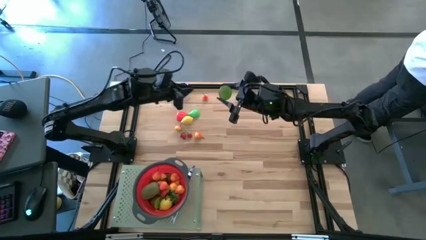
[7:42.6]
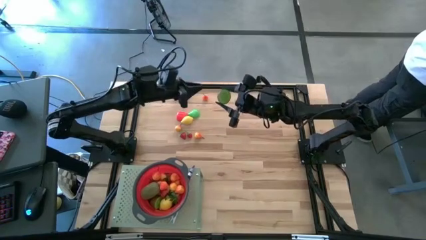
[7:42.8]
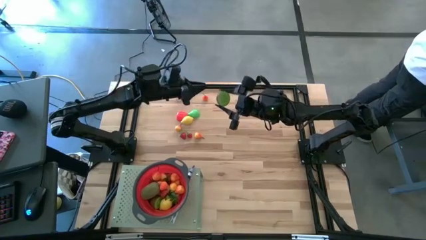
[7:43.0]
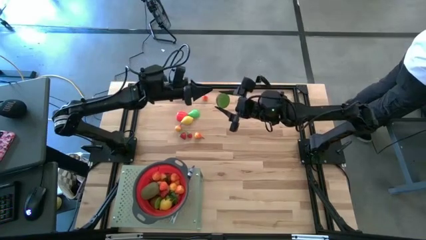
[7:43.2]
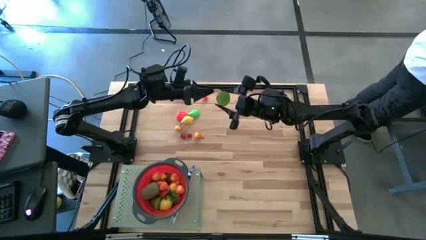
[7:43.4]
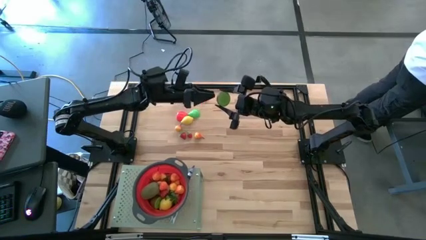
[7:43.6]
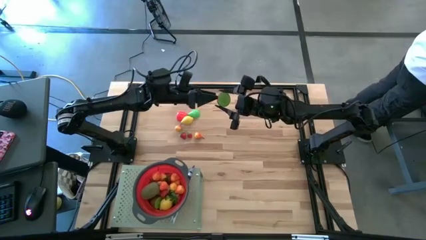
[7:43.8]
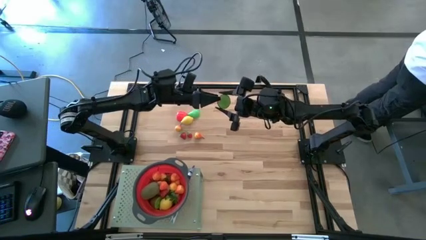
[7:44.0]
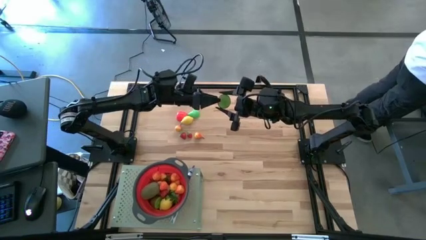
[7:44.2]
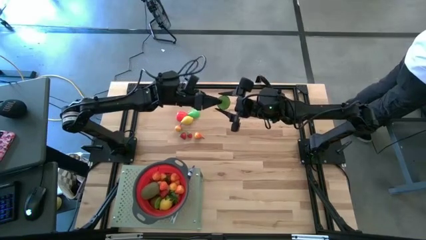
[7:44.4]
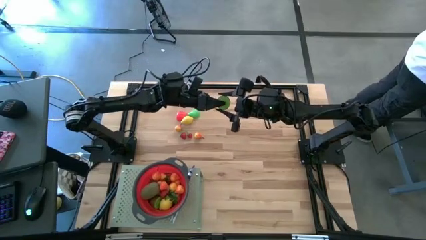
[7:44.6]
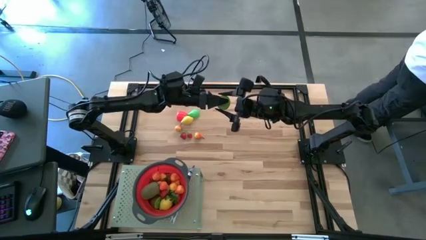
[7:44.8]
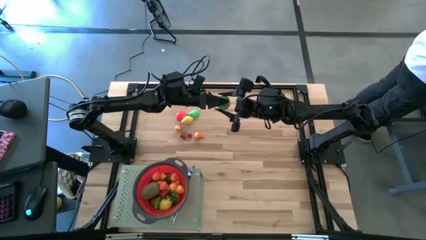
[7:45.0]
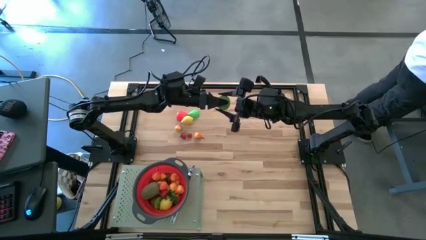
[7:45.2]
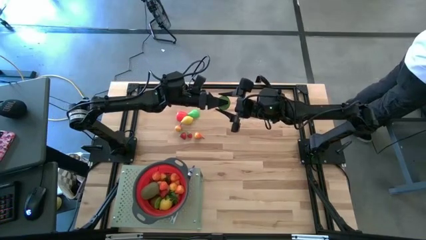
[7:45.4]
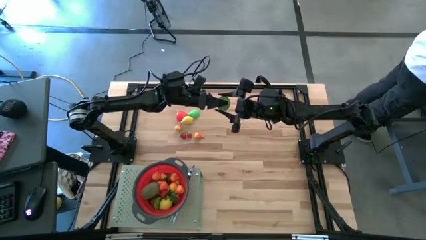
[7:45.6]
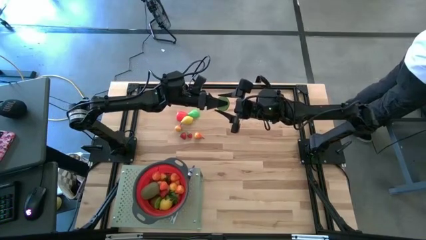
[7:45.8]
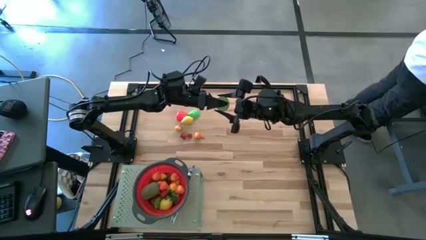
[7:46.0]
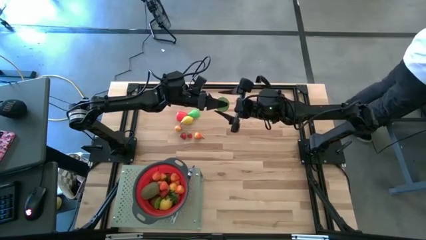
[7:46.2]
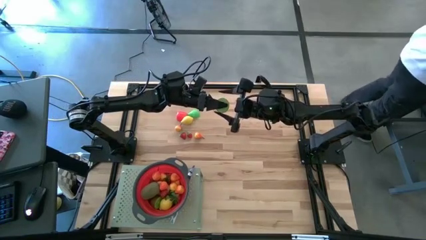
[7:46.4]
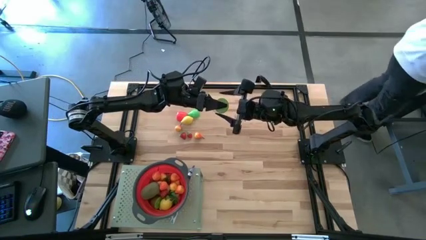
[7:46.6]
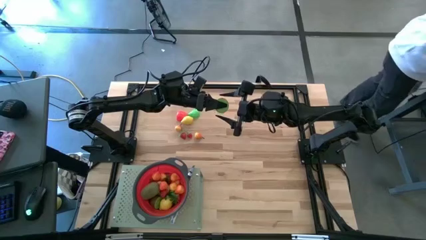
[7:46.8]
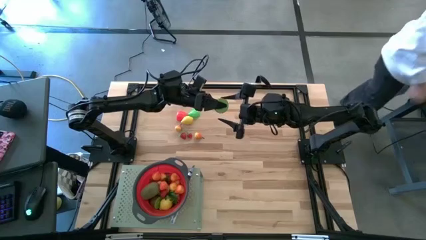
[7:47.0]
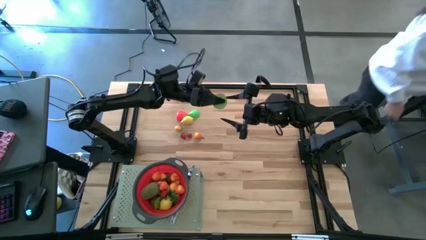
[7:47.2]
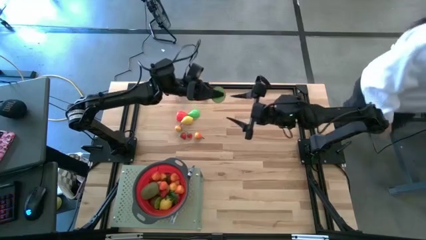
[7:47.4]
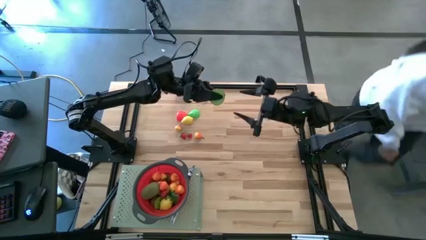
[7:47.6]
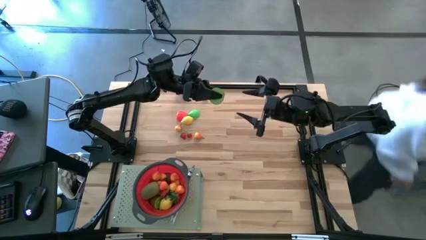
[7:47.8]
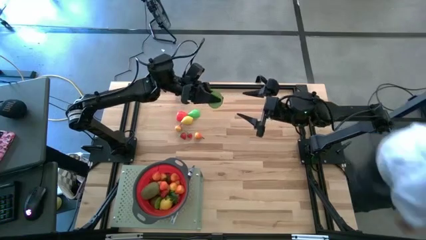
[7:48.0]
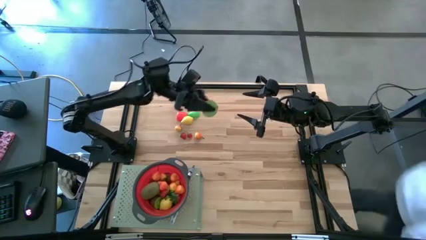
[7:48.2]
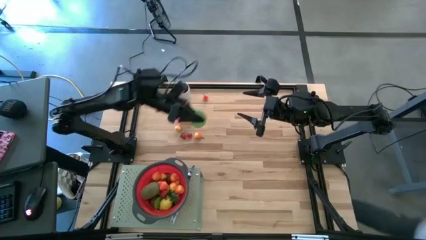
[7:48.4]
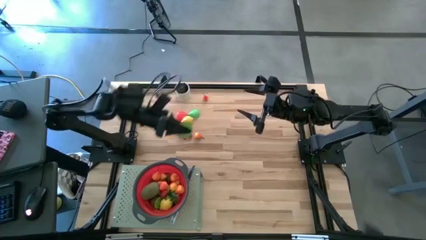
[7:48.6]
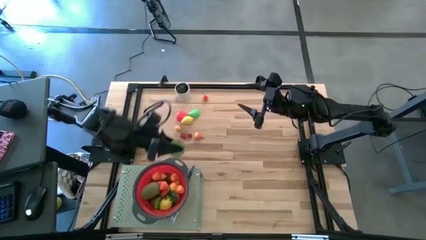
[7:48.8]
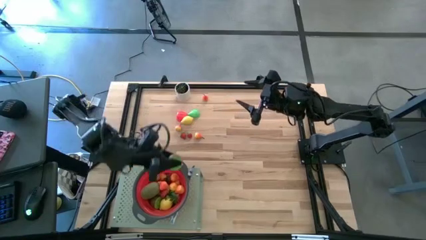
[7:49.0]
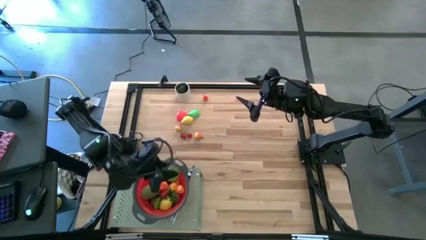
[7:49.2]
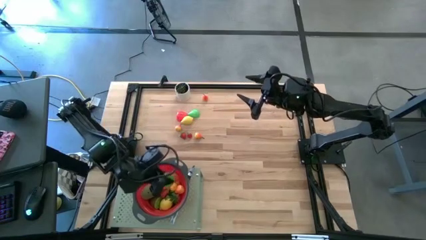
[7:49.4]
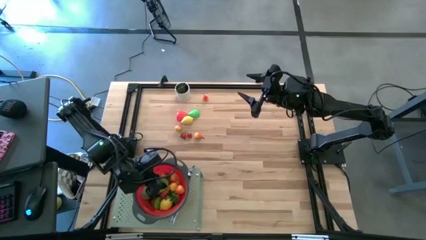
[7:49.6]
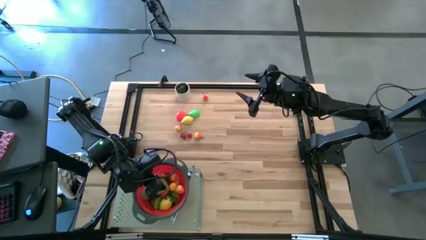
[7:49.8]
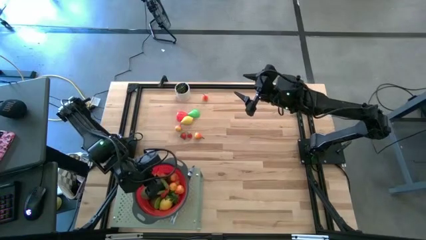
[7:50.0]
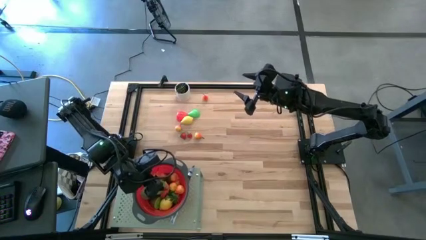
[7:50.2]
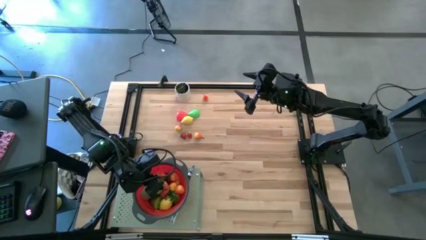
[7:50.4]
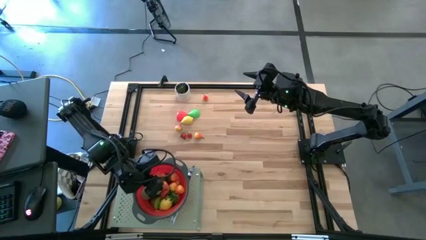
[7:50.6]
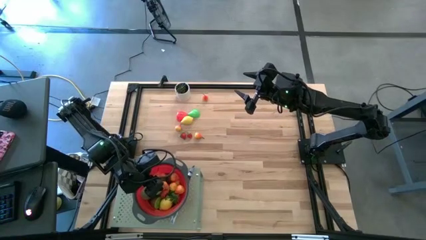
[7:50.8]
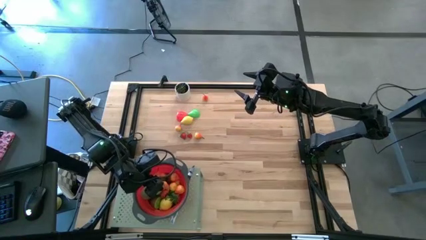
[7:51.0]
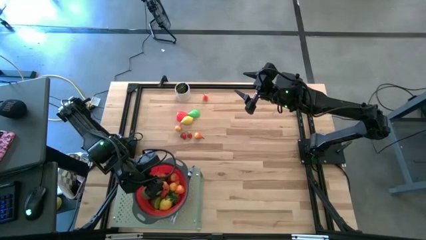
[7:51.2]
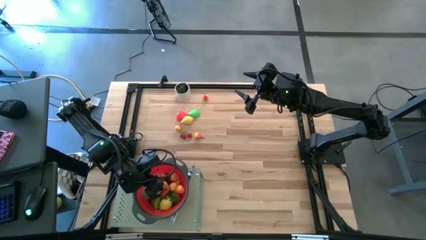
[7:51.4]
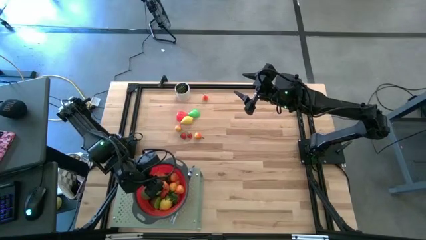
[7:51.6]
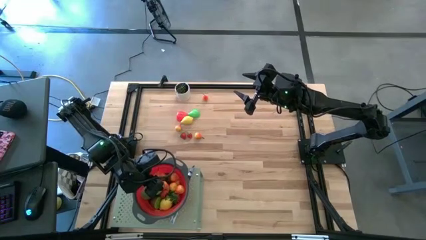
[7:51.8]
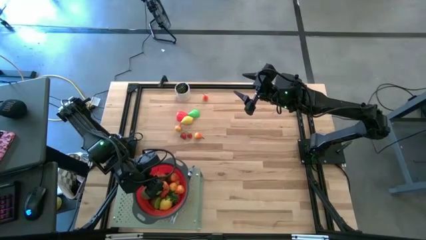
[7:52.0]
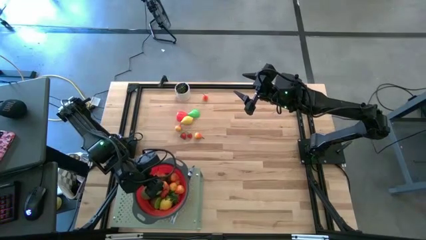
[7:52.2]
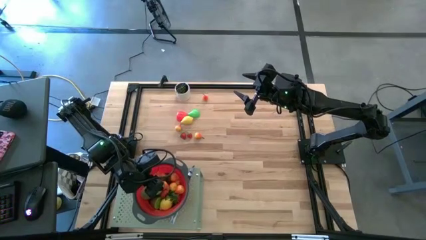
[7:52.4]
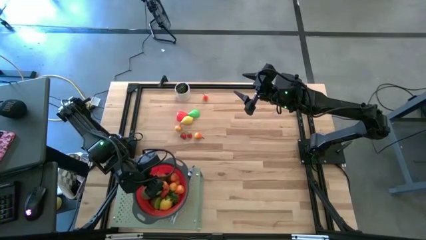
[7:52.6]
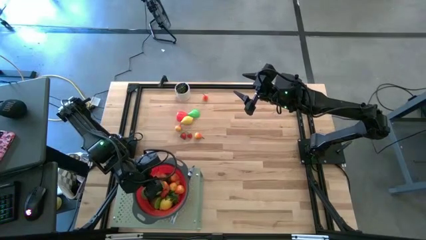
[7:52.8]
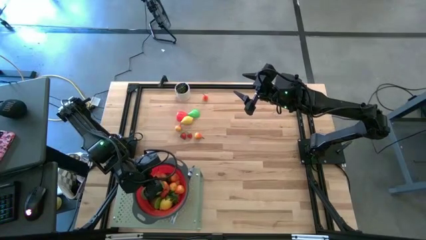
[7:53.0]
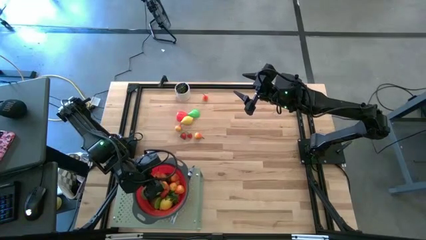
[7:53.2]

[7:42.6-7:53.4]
Task: Pick & Place Fruit
Put the half kiwi into the red strainer bowl on the shelf

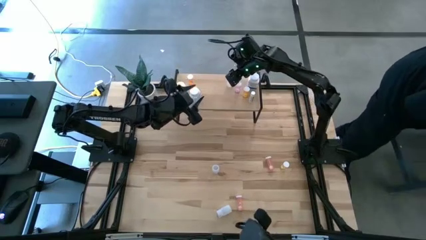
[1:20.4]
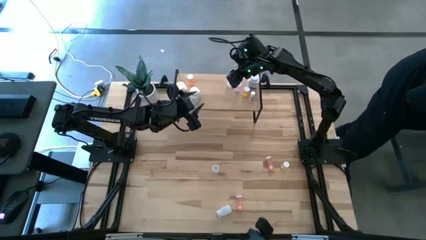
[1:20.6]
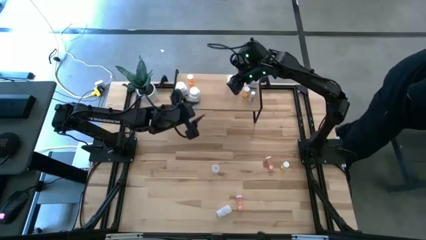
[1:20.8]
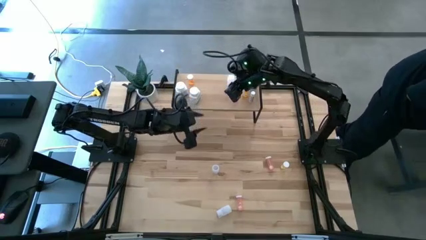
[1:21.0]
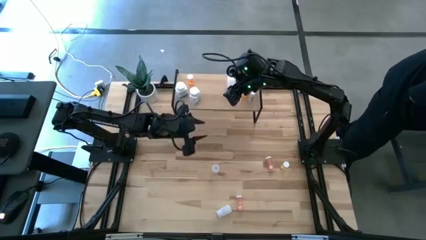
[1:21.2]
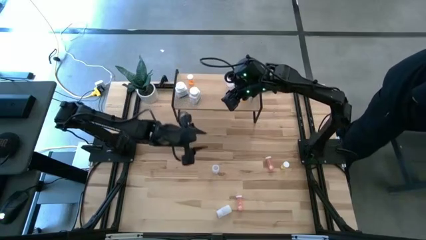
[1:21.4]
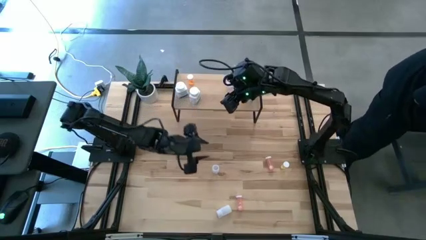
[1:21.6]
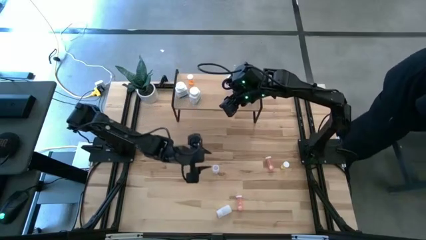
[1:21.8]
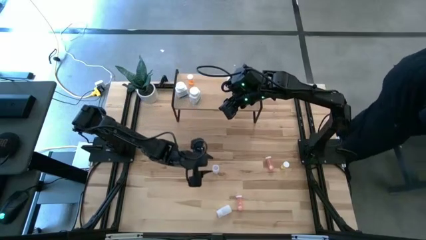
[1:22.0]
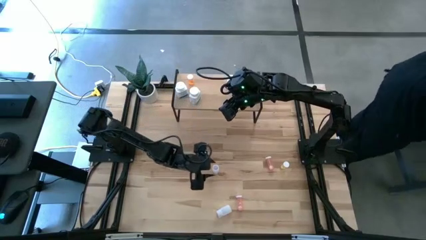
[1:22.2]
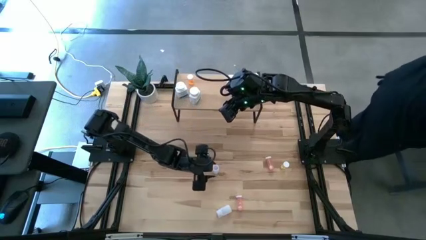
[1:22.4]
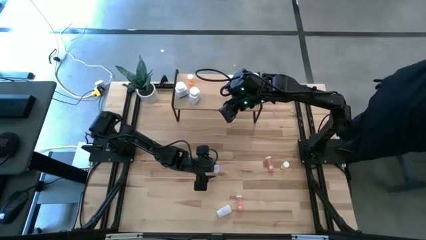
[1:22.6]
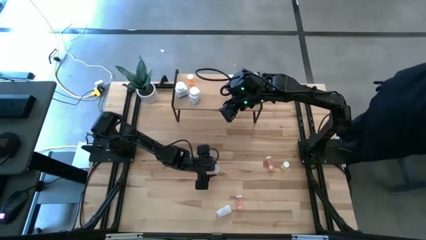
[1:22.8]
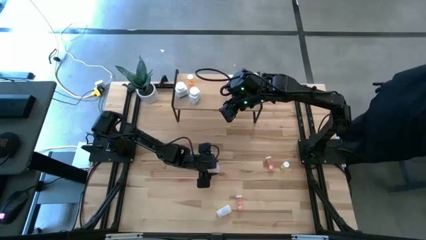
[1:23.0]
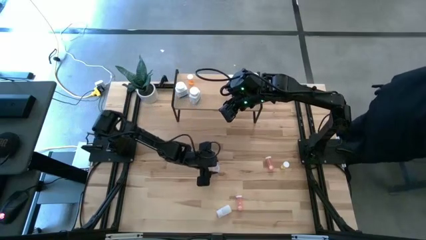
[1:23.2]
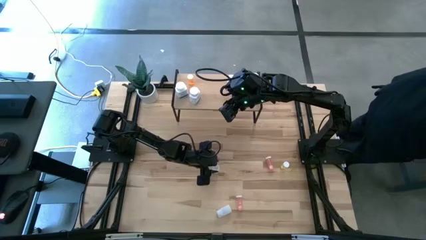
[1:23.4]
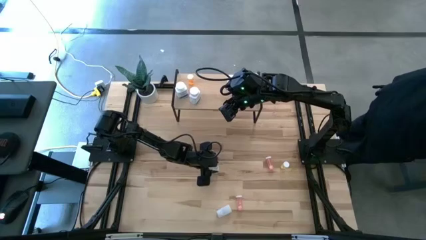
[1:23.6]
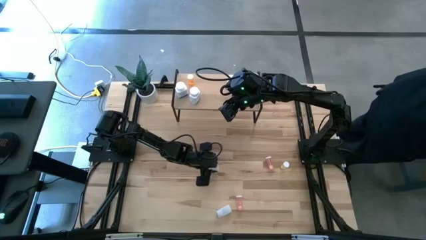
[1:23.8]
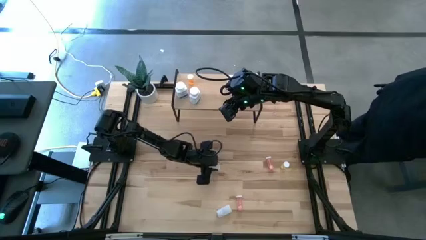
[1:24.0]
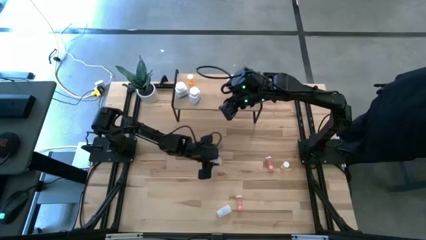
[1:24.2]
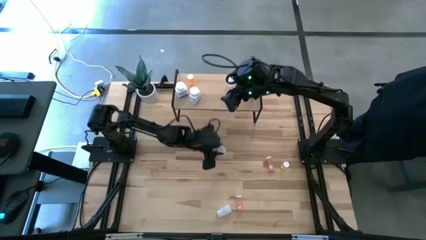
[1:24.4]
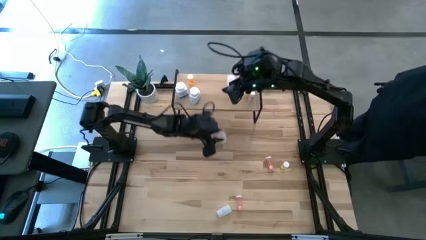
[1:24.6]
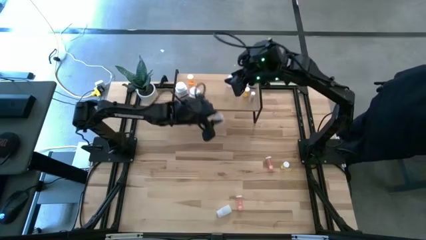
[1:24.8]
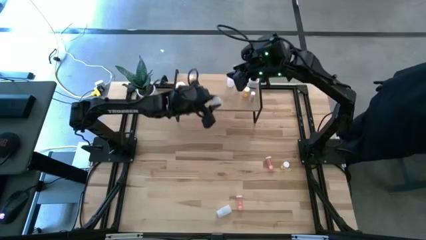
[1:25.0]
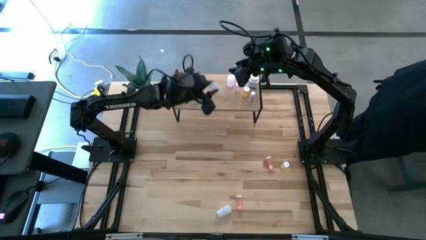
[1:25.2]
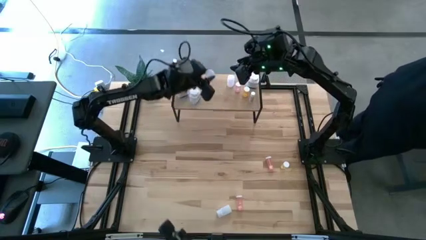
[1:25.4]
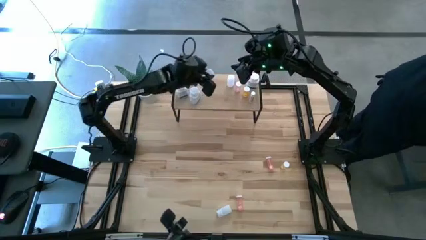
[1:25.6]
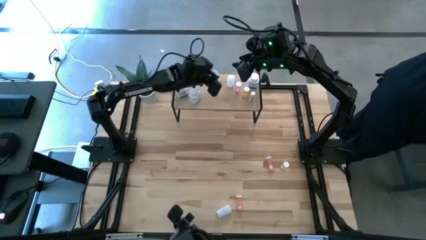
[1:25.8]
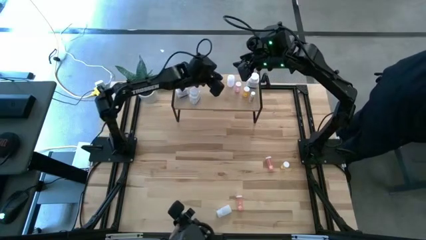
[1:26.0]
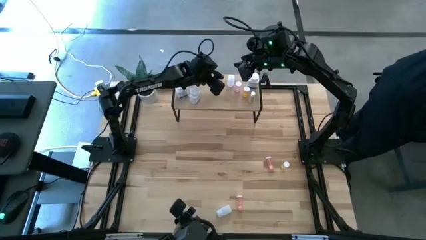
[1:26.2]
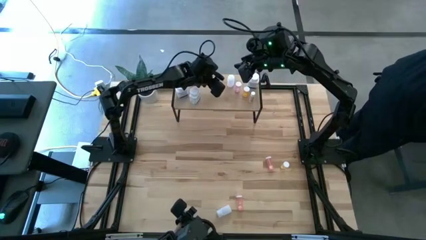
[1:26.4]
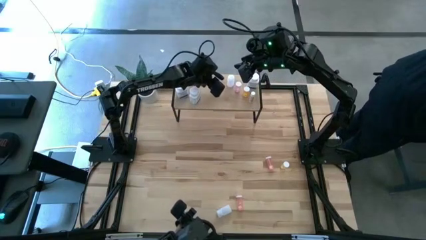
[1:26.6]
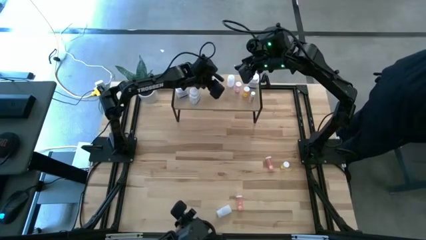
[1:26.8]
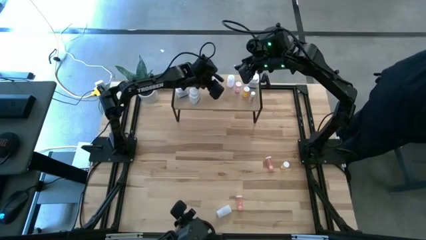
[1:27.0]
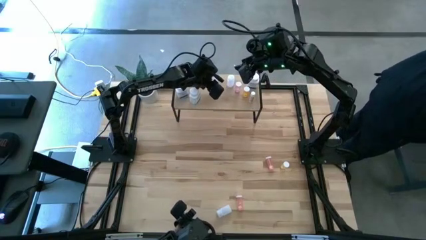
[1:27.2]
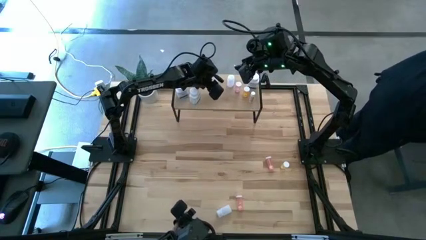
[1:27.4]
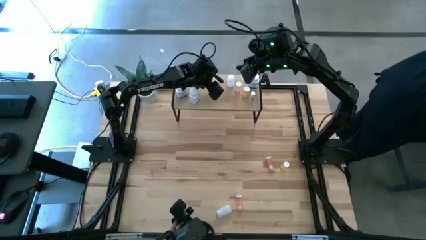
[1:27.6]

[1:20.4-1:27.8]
Task: Pick and place medicine bottles onto shelf by color
Put the top white pill bottle on the shelf
